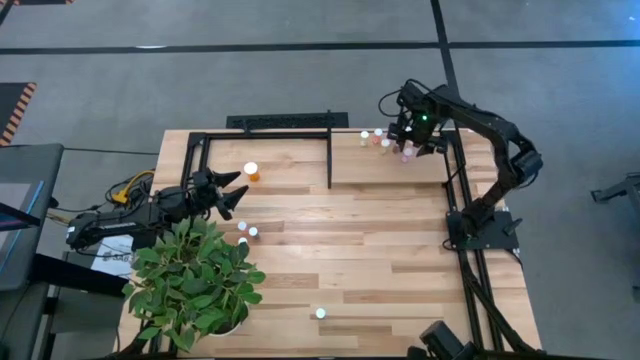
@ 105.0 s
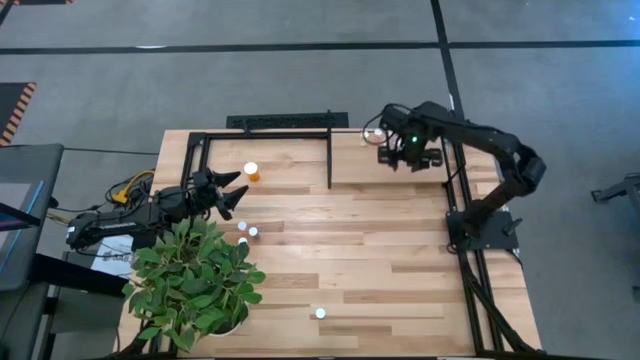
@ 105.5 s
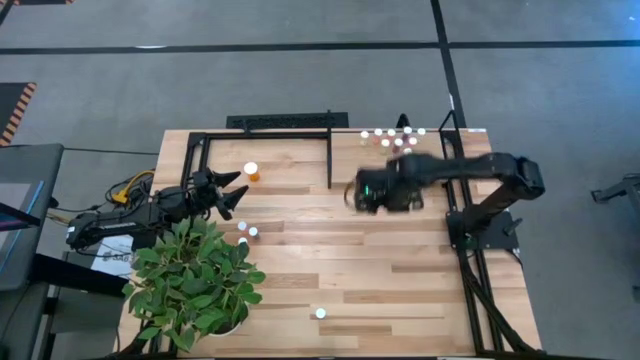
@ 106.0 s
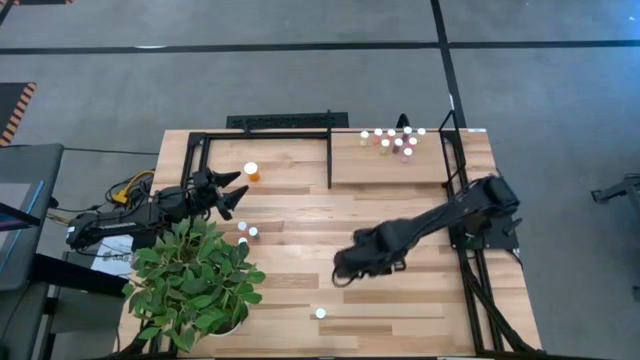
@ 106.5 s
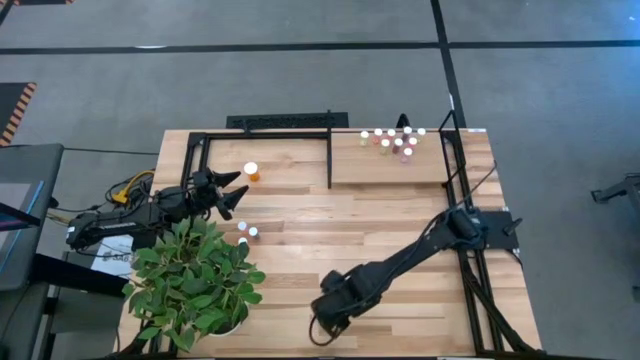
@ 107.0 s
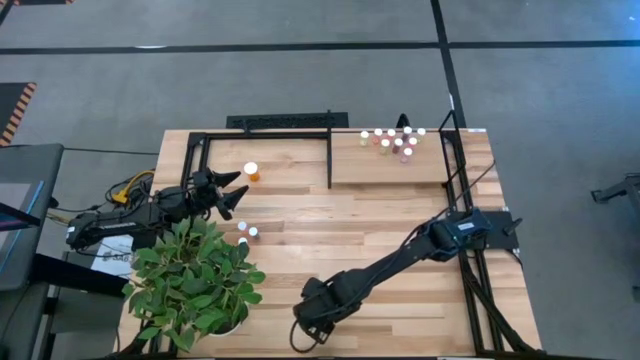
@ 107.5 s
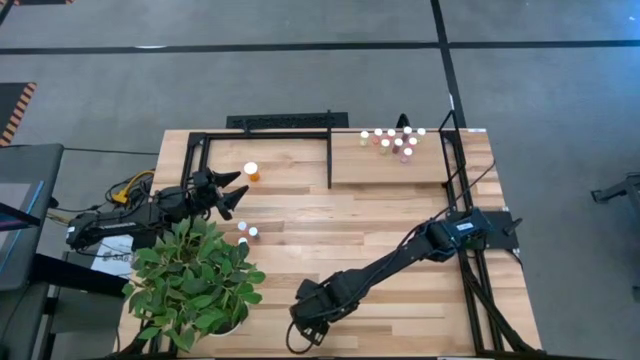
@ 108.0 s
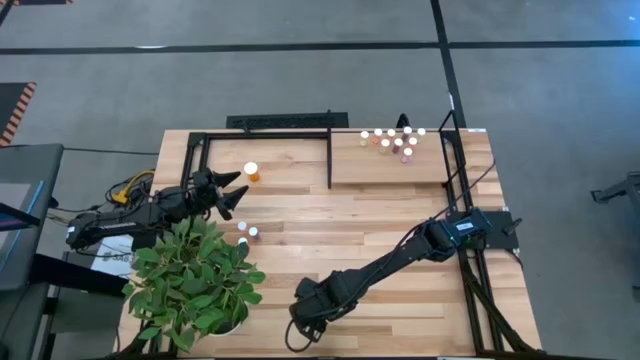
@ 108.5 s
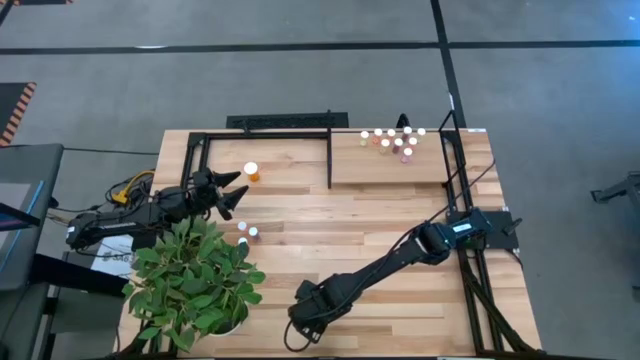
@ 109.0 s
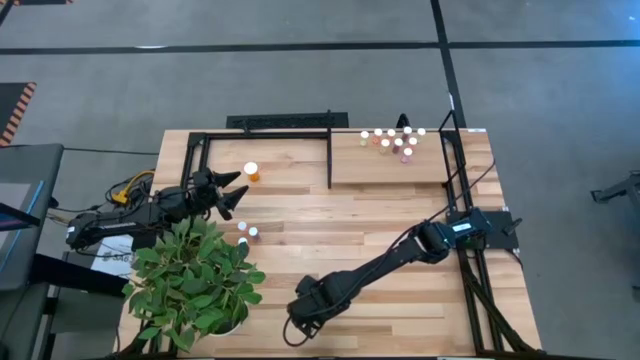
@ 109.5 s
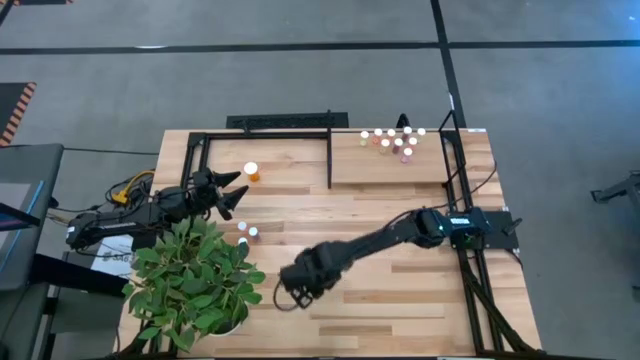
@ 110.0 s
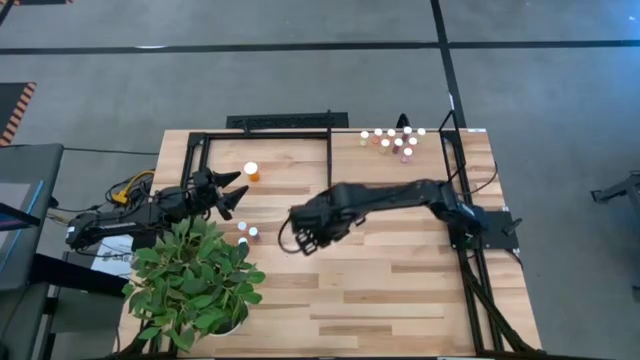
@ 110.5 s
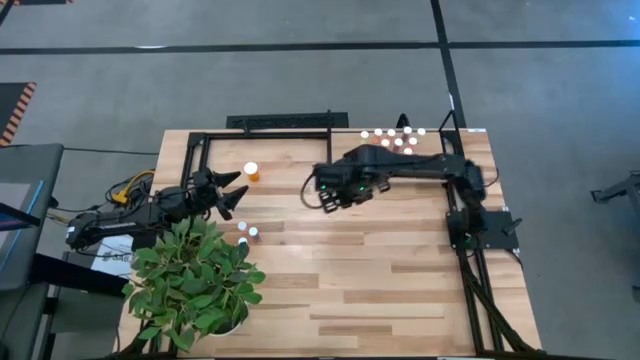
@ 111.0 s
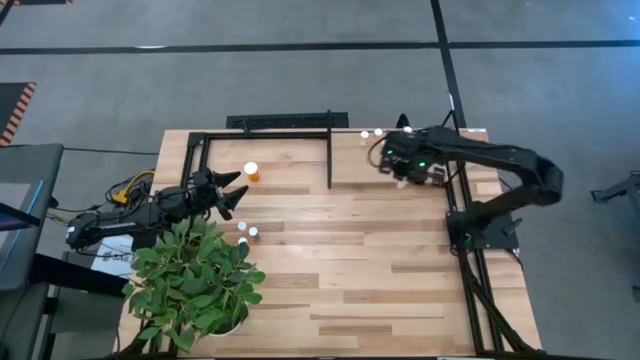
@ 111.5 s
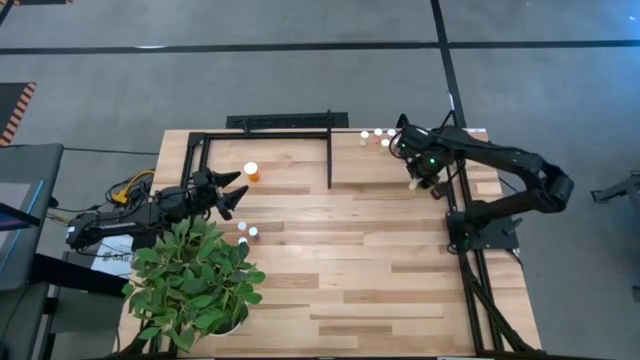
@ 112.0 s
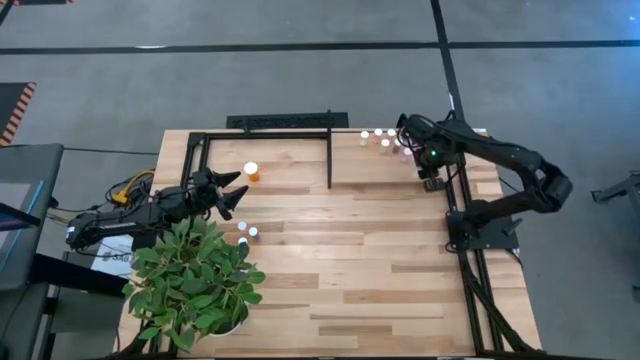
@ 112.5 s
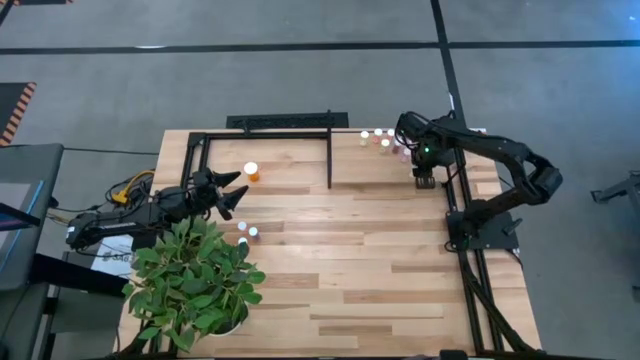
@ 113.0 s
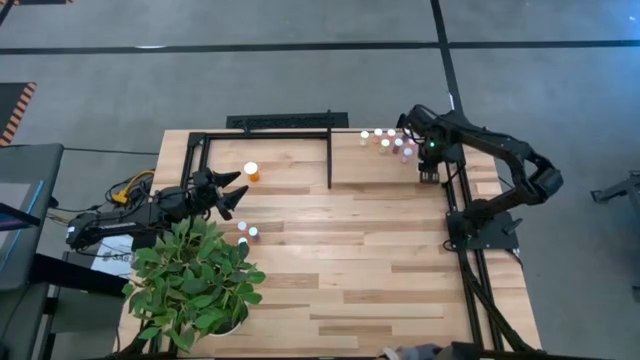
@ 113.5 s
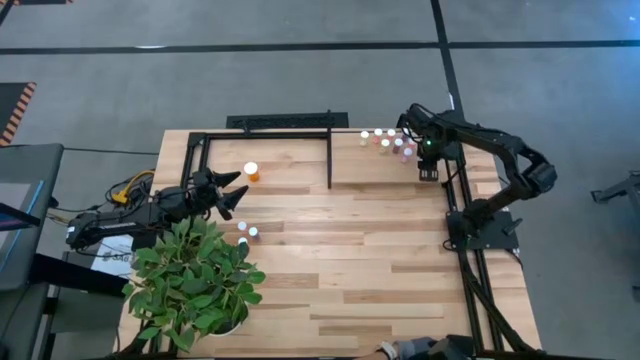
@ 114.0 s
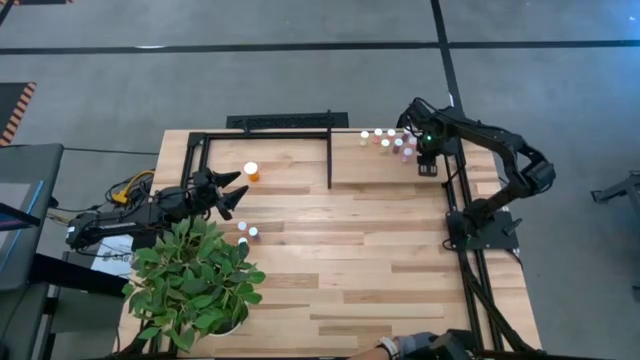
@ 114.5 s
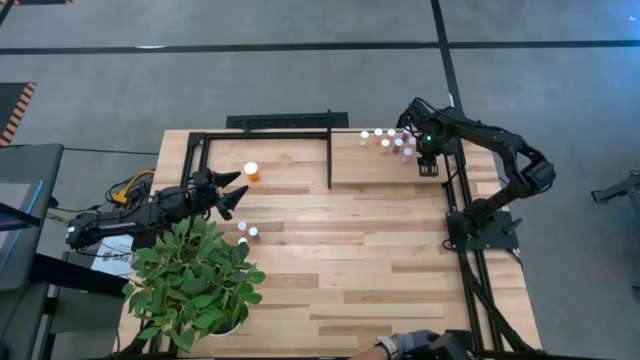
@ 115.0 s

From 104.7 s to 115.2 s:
Task: Pick and place medicine bottles onto shelf by color
Put the yellow pill bottle on the shelf

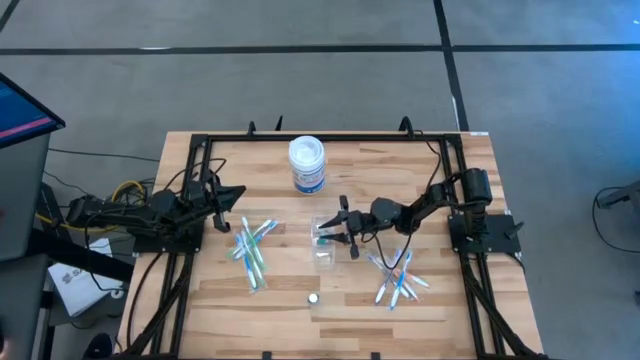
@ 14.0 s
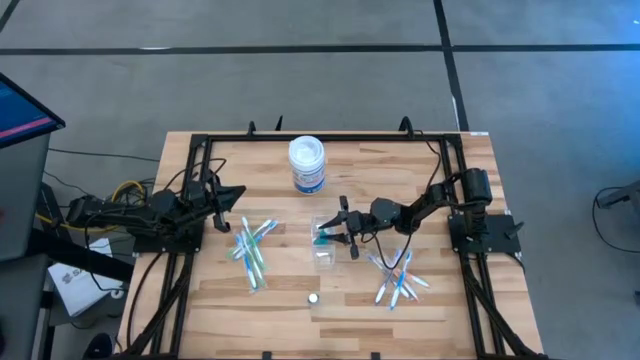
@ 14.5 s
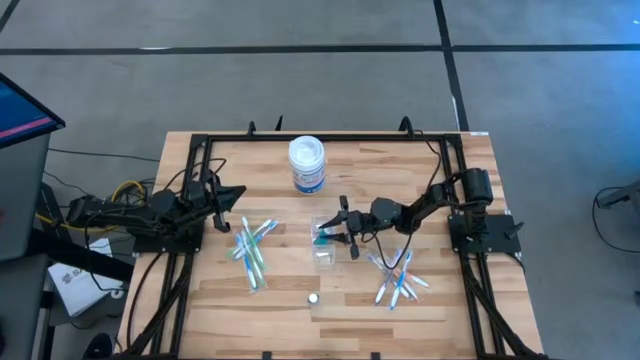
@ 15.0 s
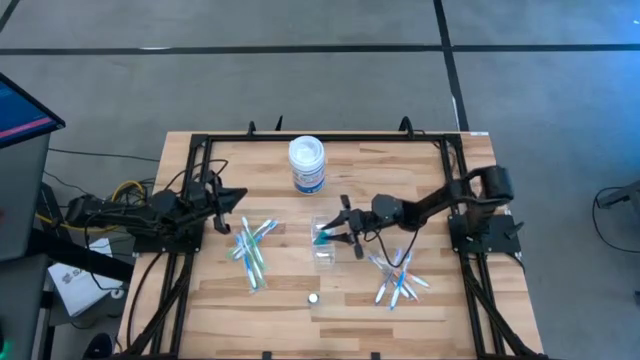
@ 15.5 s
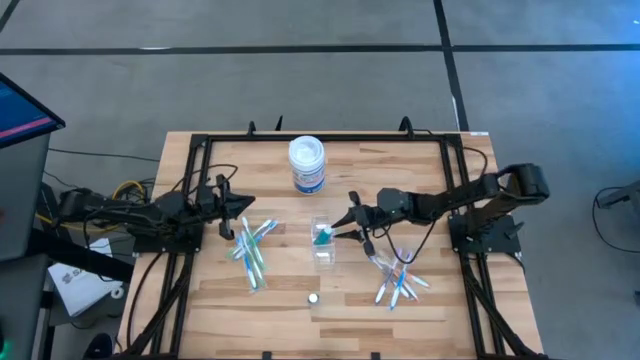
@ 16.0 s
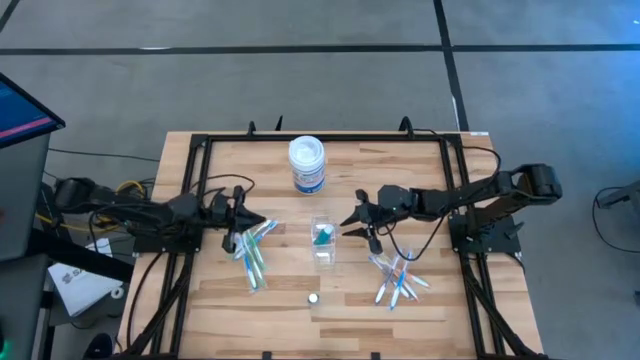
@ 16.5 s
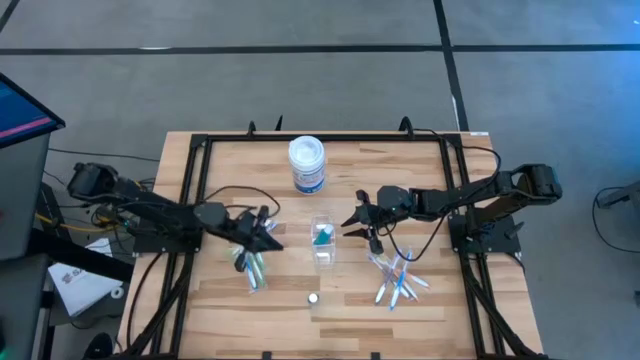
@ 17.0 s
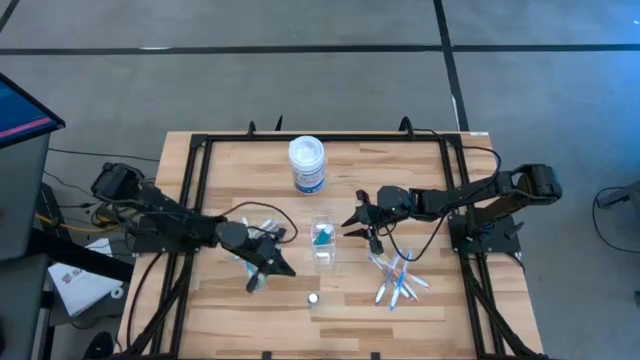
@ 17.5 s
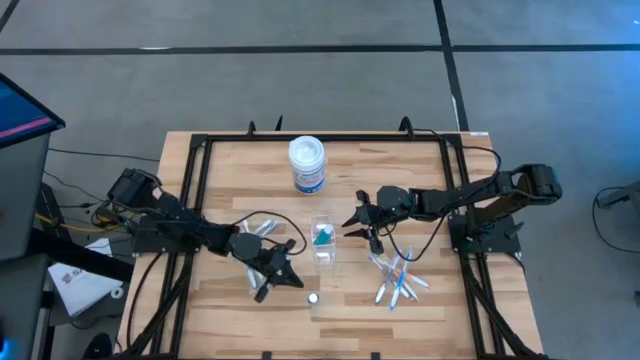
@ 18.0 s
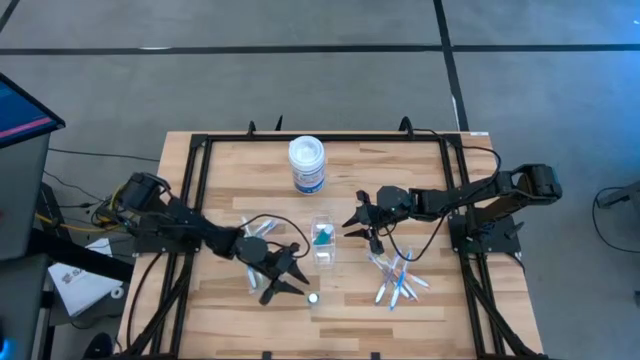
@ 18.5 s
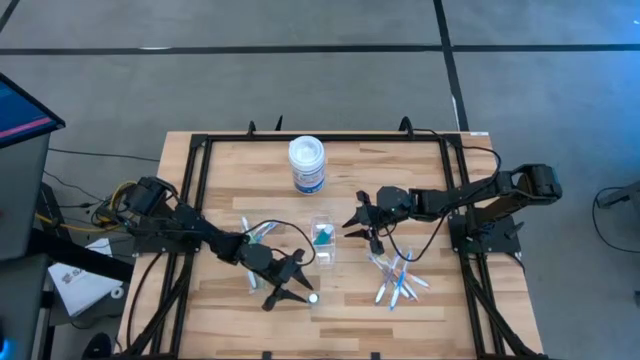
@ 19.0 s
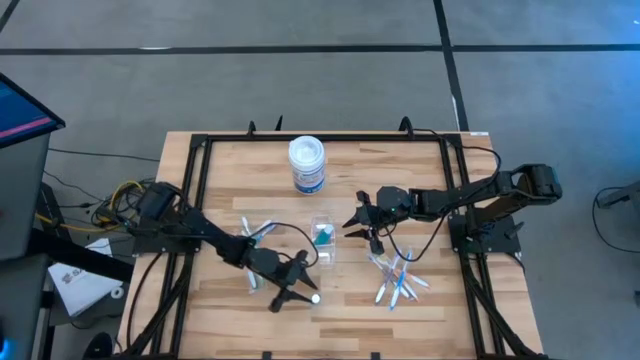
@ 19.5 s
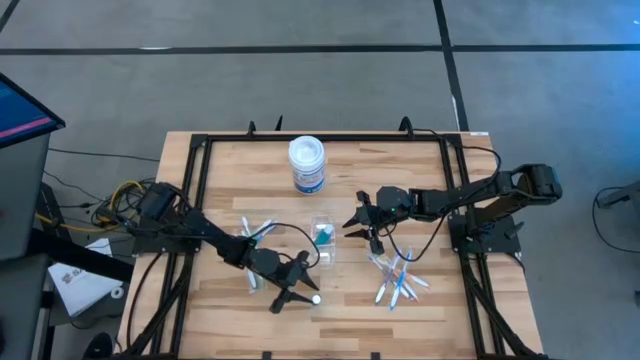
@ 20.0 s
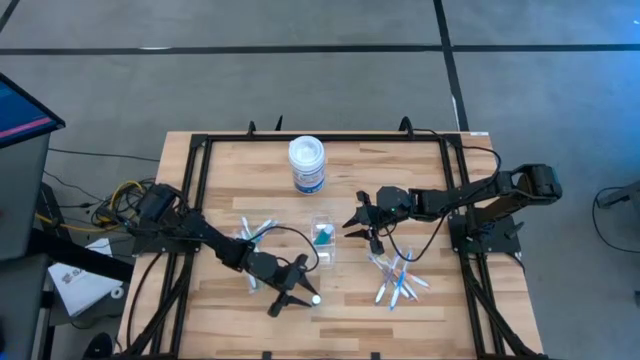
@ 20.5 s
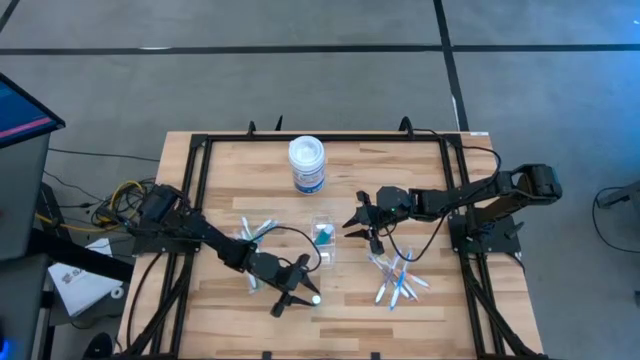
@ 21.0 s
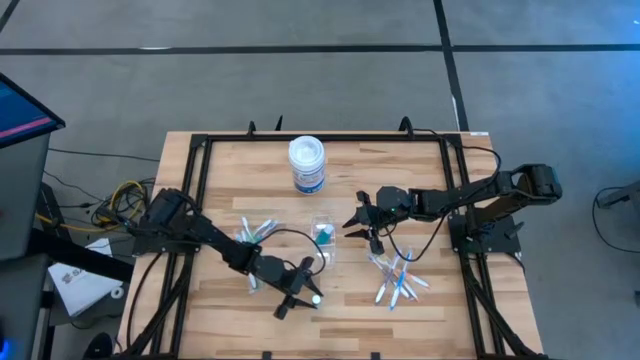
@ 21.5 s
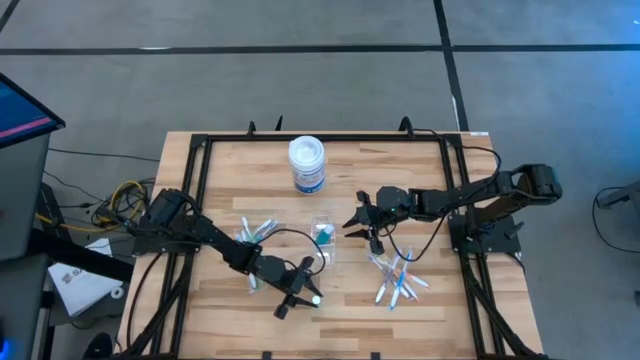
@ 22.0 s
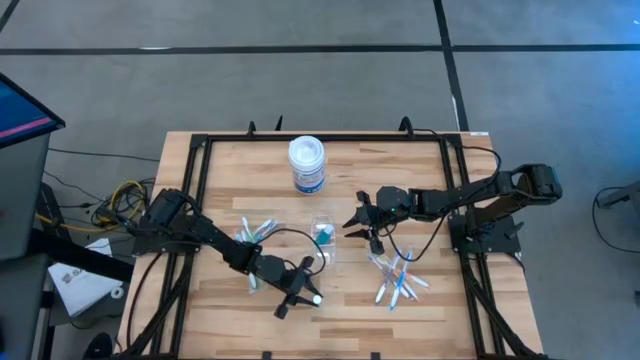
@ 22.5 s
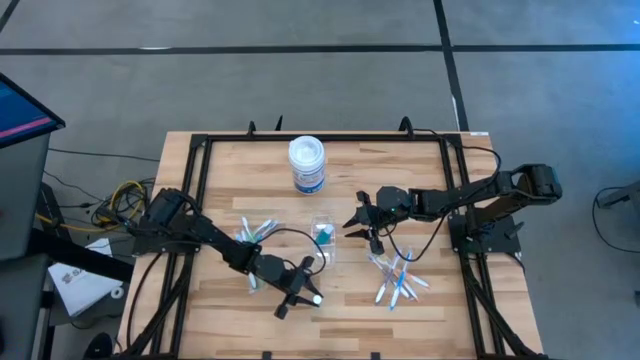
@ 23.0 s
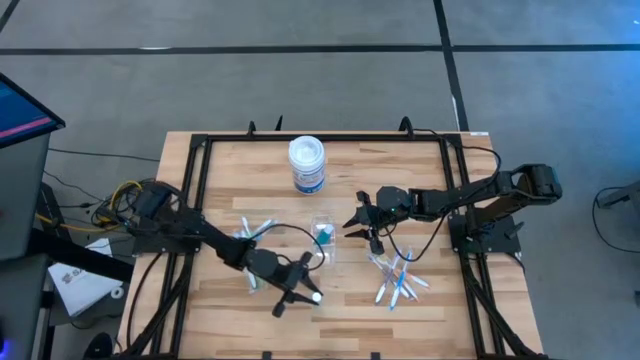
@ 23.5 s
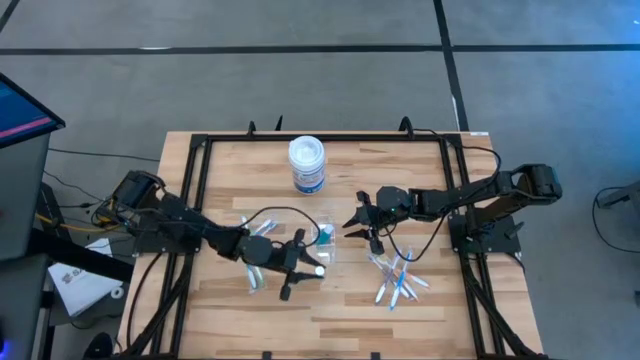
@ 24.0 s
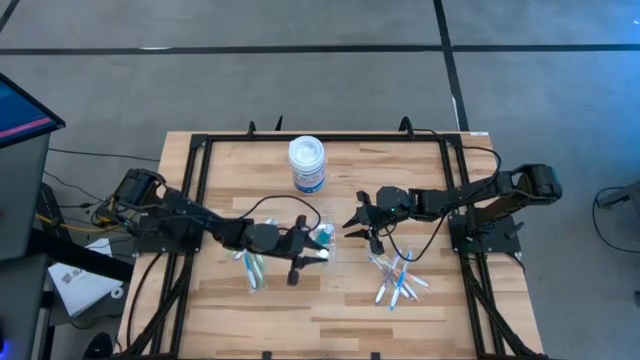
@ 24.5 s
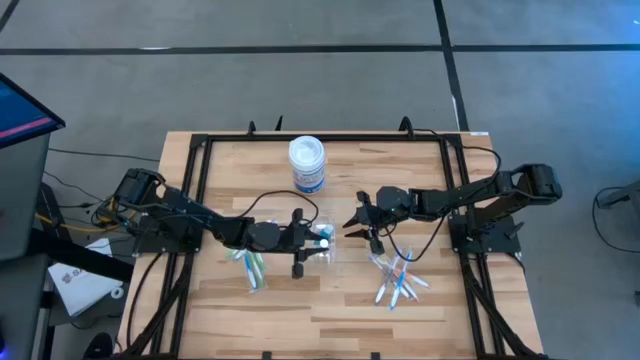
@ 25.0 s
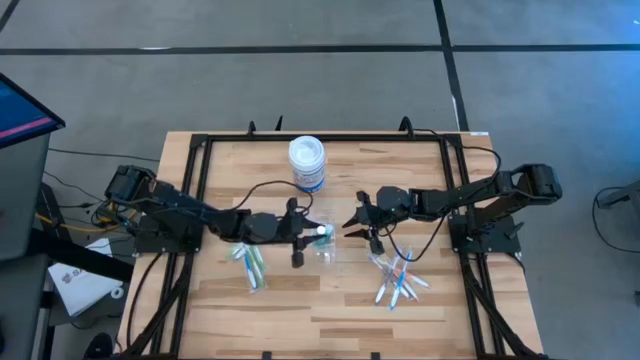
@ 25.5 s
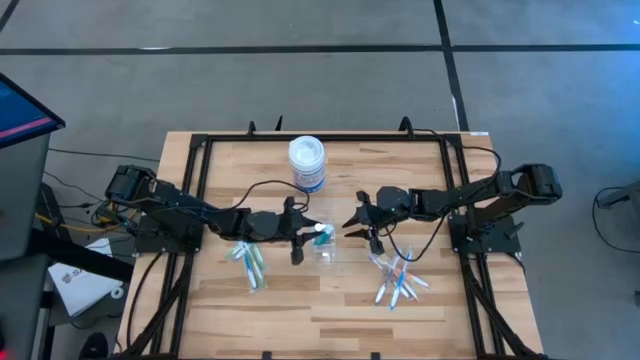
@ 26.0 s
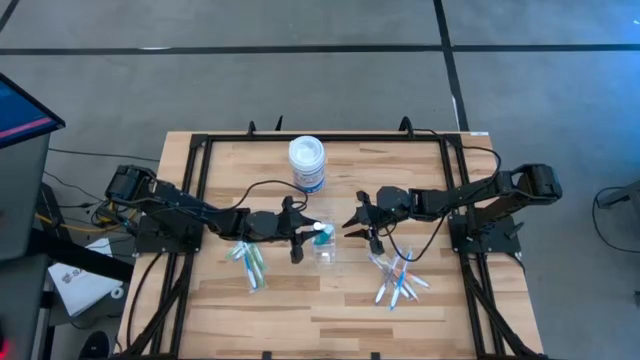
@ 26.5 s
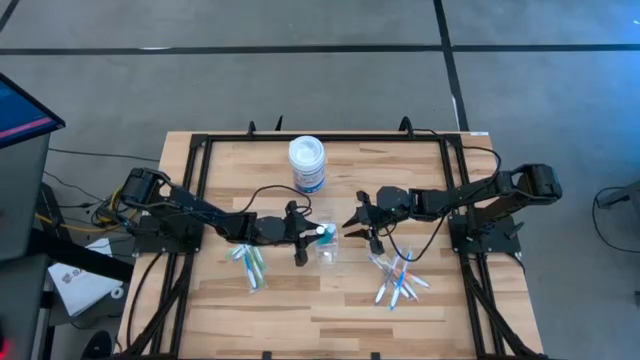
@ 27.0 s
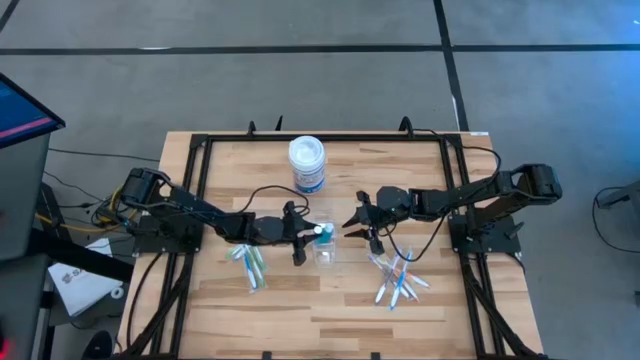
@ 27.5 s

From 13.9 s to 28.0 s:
Task: Pick & Place toothbrushing station
Put the blue mouthwash into the Transparent organizer
